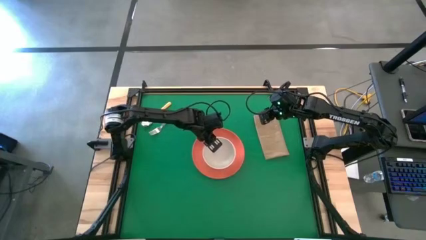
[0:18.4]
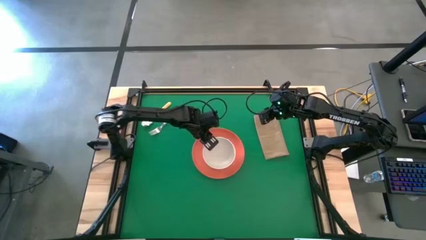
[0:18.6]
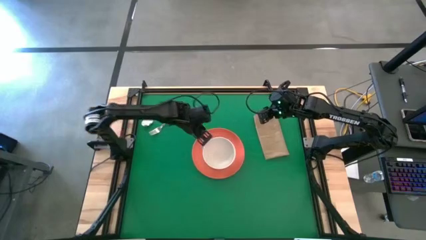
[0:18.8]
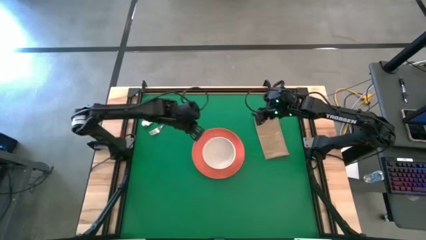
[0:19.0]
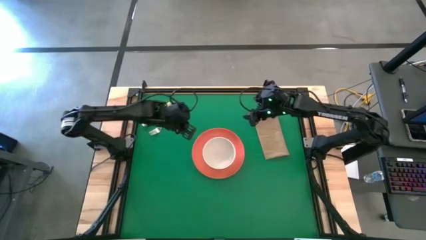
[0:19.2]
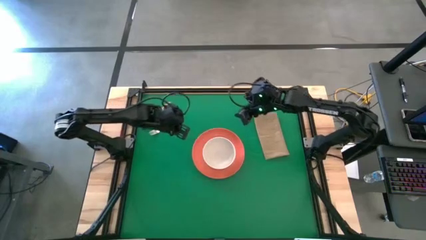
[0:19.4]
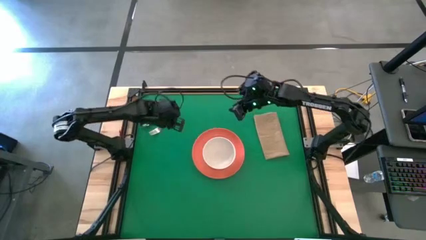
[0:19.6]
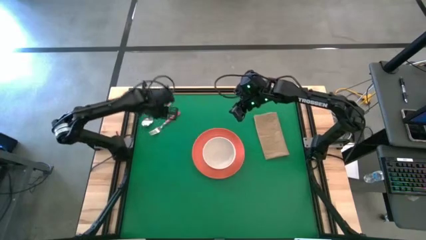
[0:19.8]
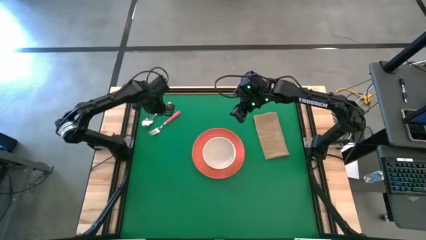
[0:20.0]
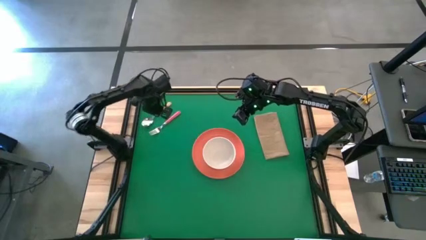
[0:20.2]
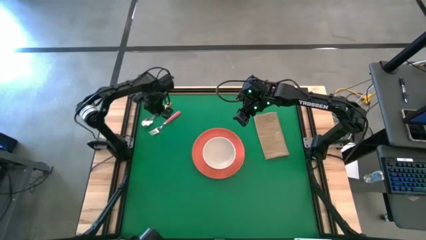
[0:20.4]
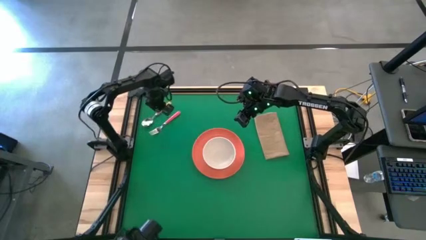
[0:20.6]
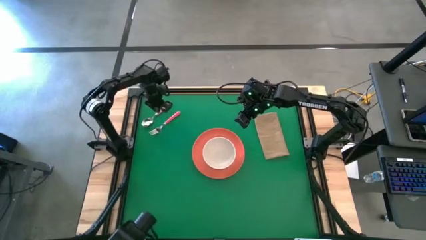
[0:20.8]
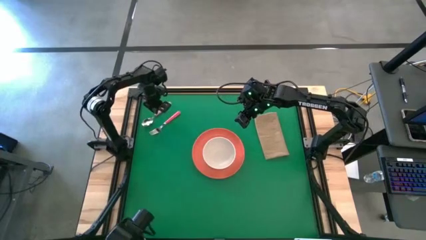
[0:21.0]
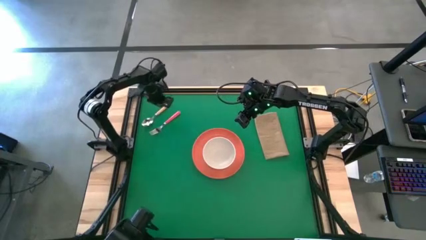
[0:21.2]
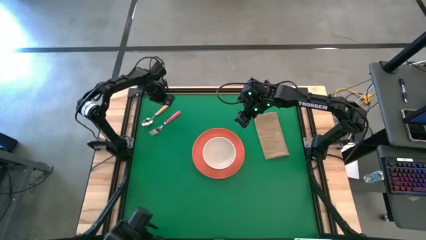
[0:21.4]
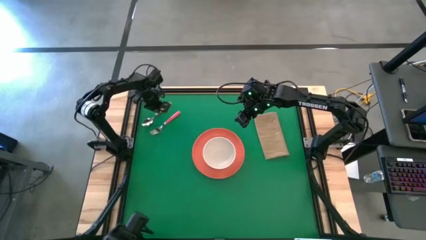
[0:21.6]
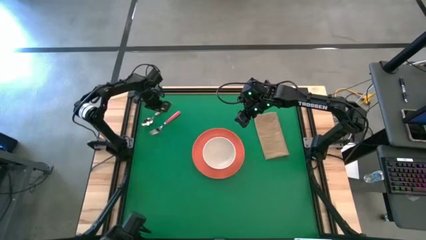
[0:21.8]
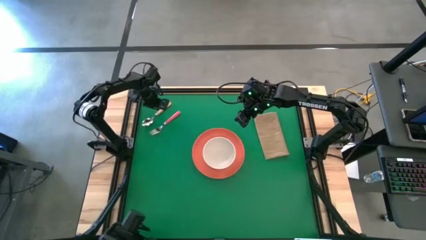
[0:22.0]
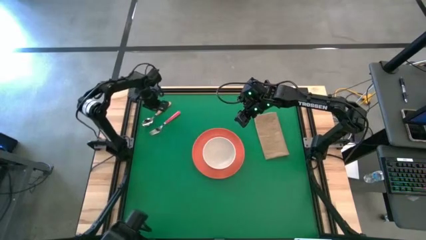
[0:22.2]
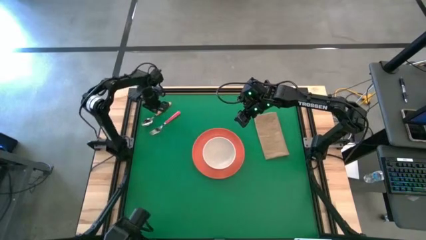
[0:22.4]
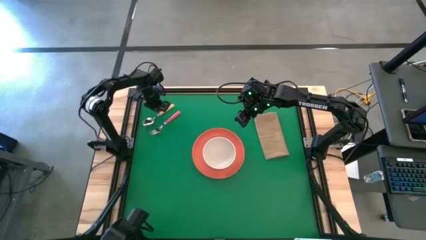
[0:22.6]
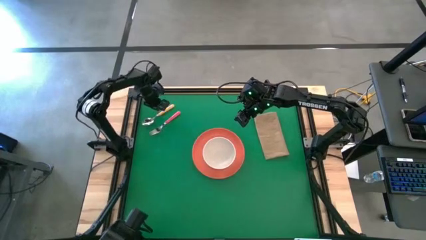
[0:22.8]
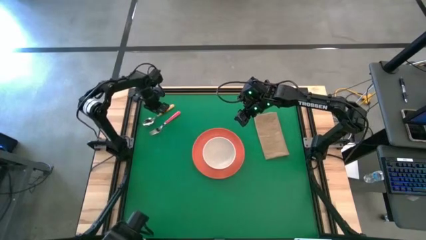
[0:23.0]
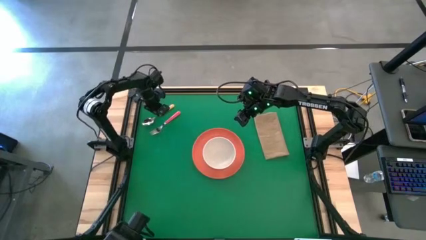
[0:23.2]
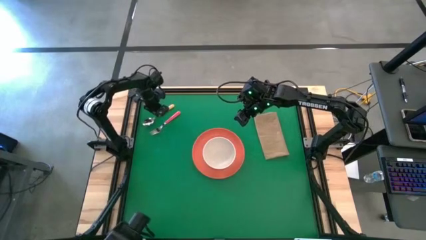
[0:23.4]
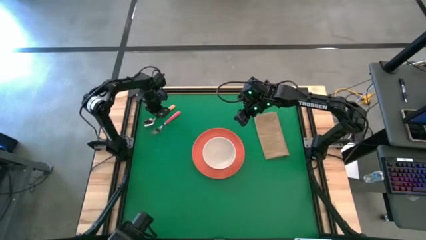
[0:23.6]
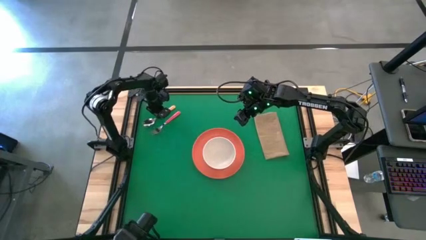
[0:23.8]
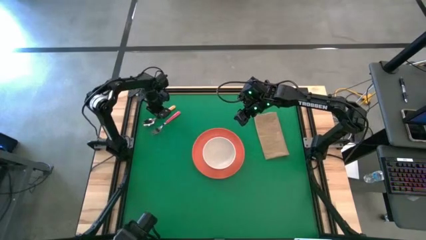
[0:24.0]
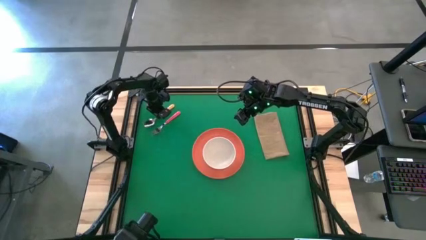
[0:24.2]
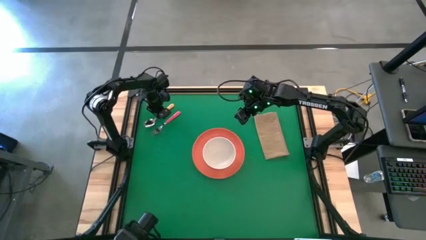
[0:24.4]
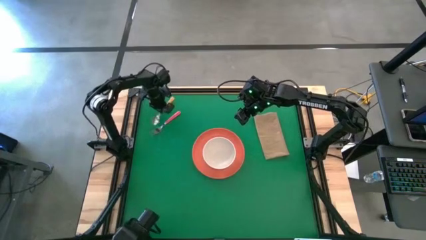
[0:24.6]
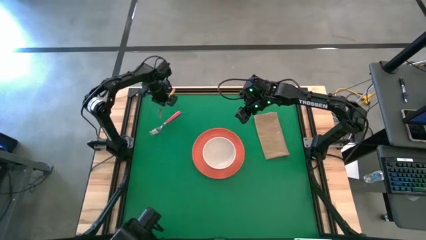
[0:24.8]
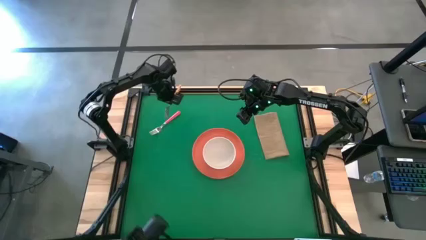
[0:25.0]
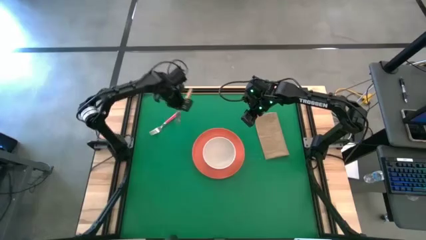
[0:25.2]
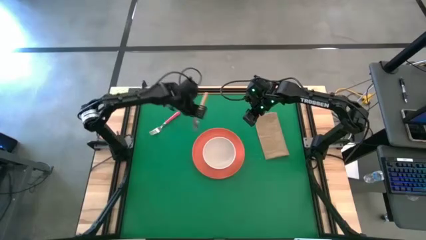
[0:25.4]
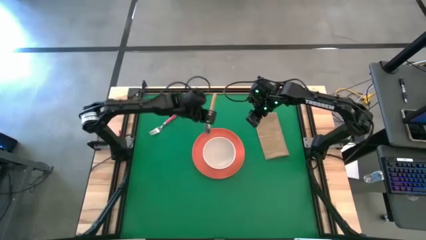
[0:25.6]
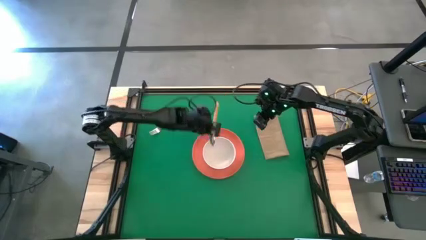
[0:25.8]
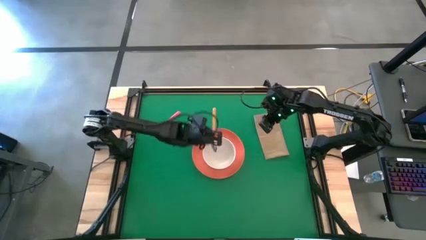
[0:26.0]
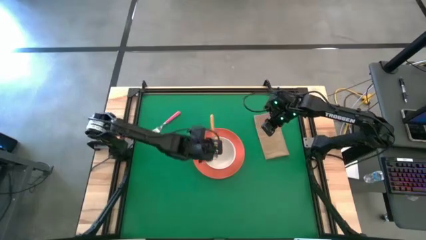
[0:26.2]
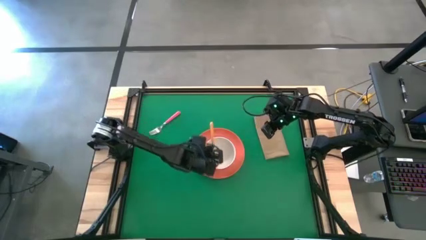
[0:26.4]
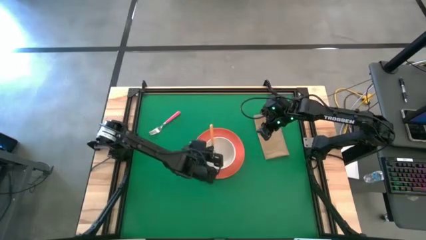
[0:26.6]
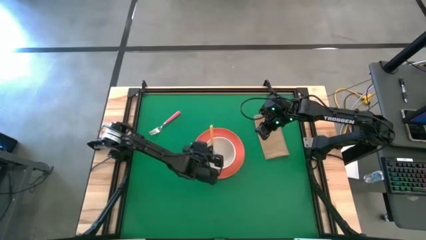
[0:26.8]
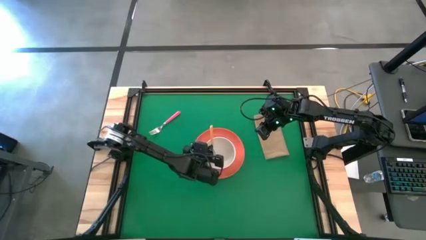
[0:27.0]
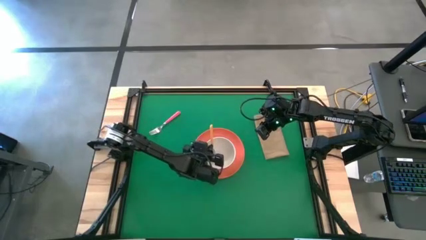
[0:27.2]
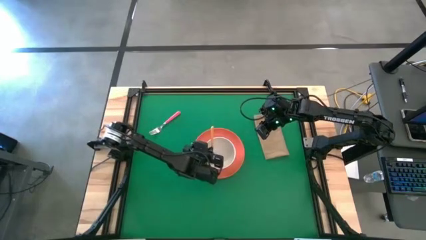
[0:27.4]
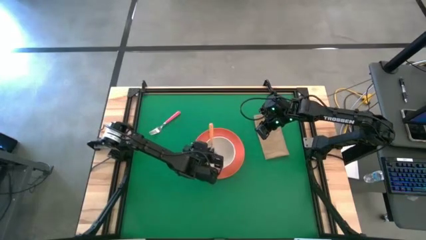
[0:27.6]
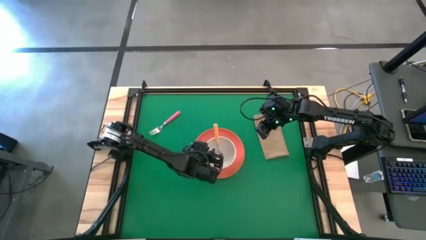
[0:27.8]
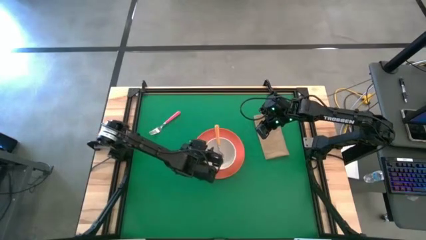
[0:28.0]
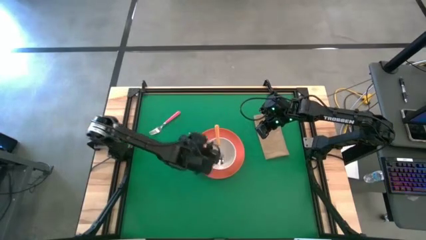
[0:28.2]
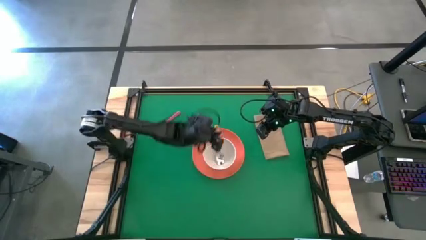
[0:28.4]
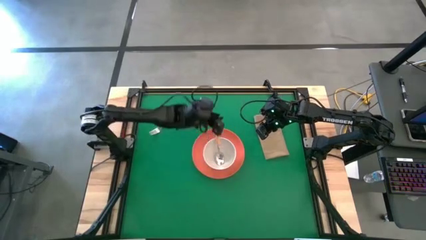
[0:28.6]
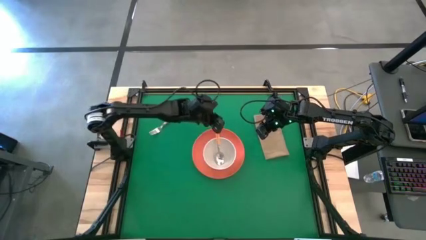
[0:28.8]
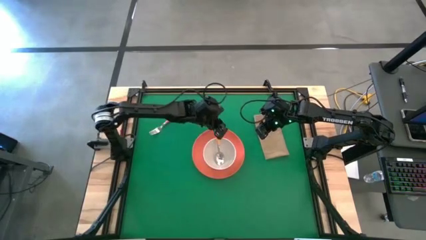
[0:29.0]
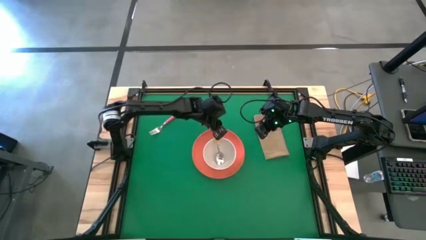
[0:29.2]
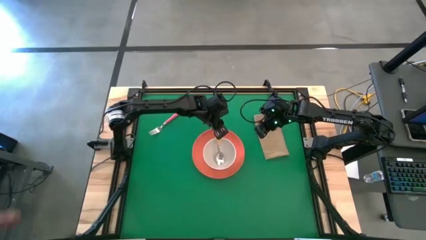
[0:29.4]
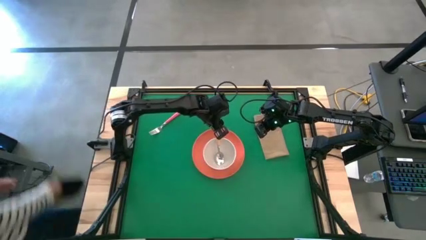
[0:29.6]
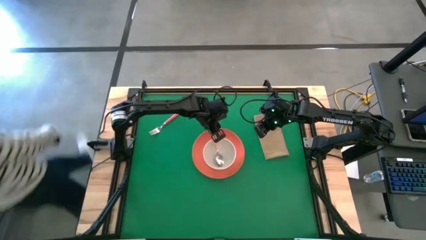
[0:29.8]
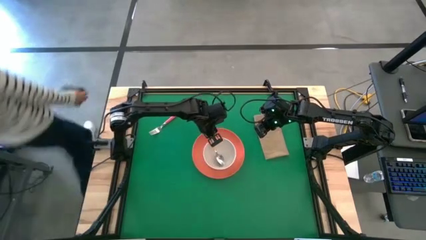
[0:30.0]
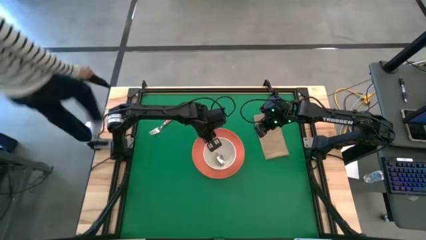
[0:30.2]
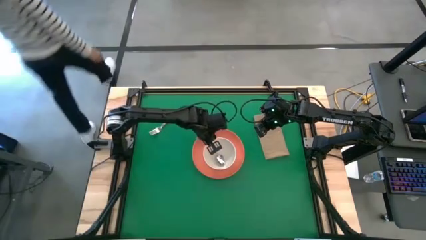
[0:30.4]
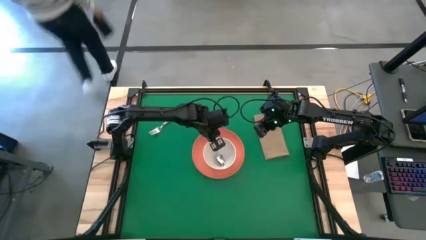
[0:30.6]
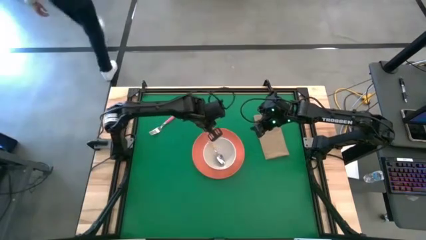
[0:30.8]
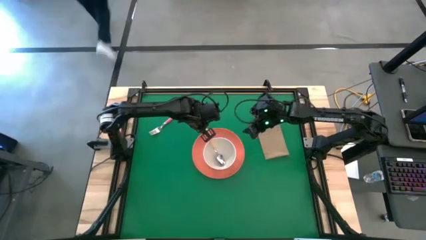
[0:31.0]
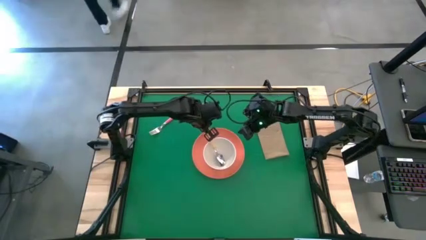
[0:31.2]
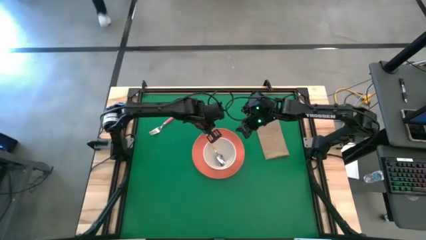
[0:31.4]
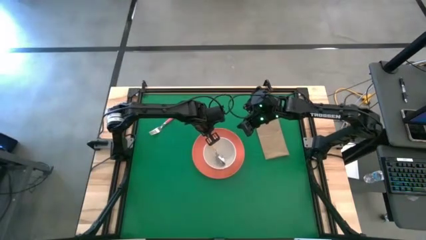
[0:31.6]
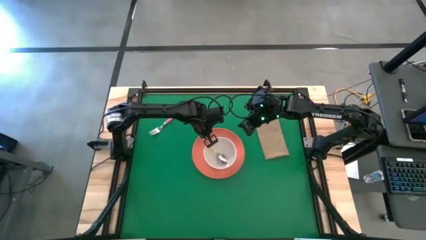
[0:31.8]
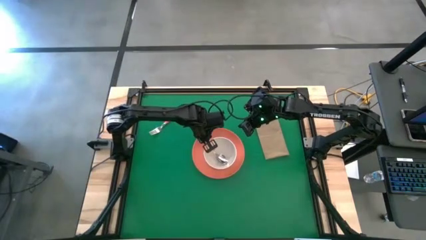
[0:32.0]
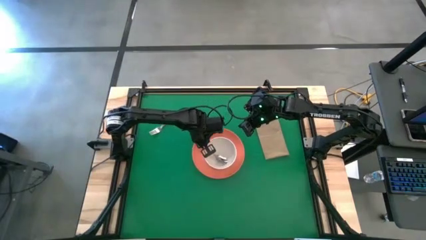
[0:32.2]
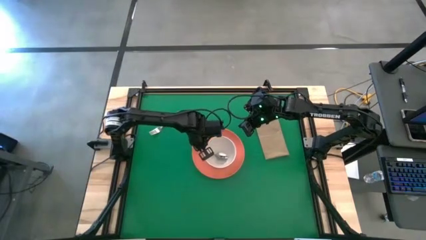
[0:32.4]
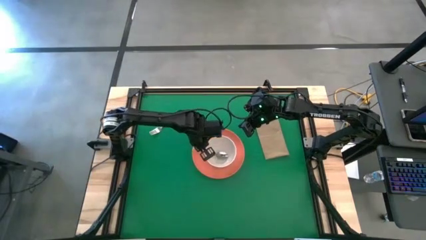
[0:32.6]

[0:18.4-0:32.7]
Task: Set table place
Put the yellow spoon into the white bowl

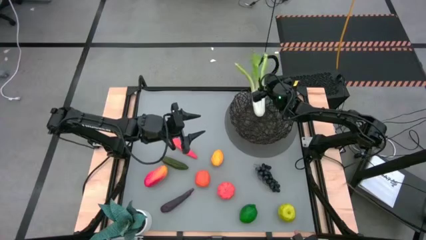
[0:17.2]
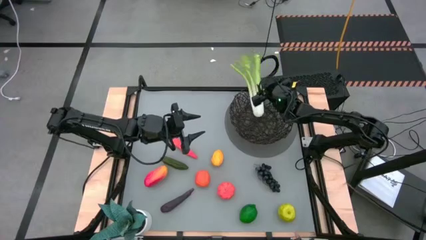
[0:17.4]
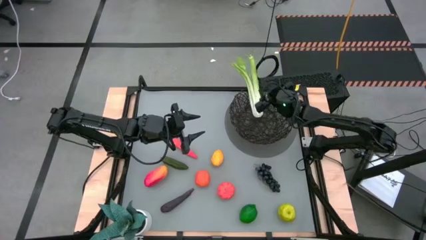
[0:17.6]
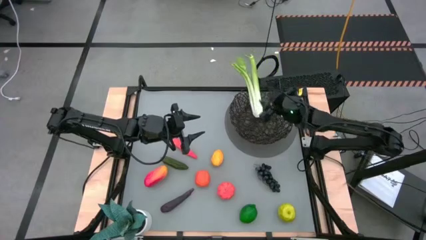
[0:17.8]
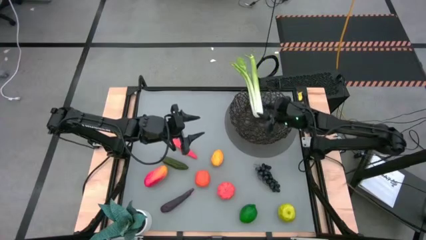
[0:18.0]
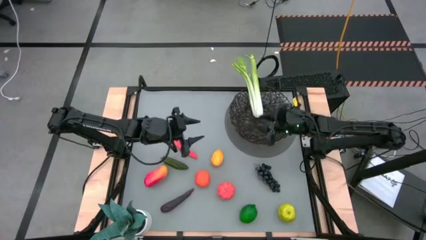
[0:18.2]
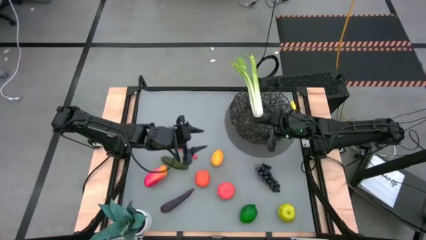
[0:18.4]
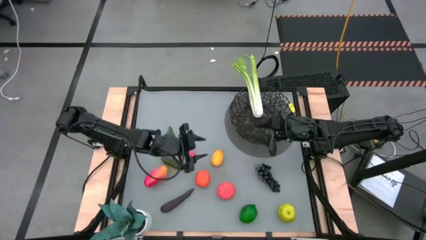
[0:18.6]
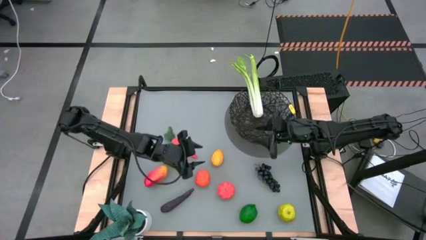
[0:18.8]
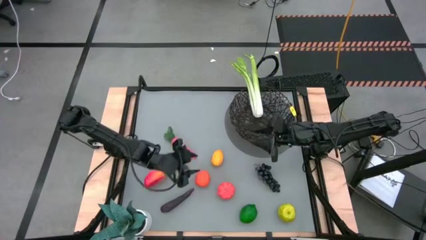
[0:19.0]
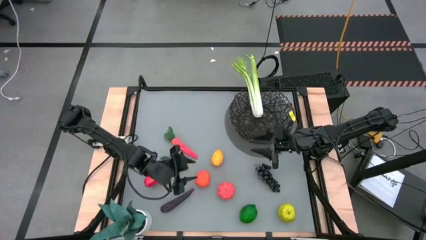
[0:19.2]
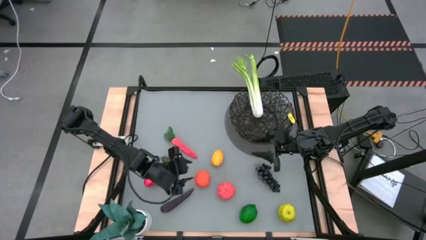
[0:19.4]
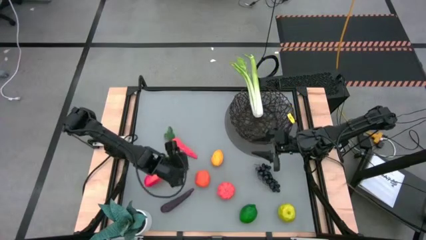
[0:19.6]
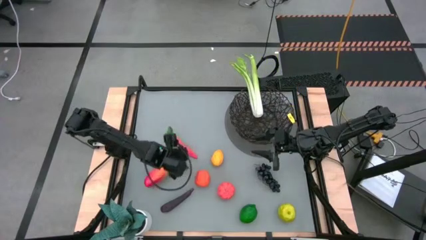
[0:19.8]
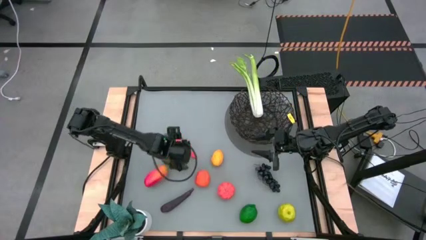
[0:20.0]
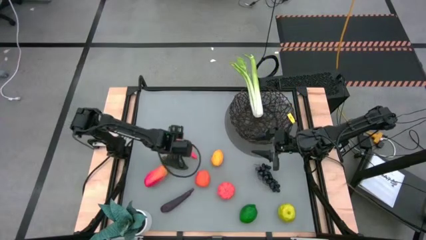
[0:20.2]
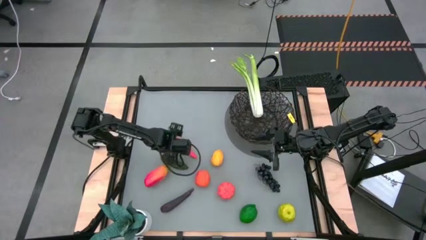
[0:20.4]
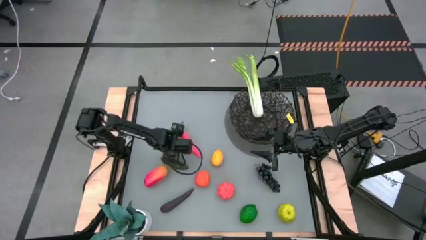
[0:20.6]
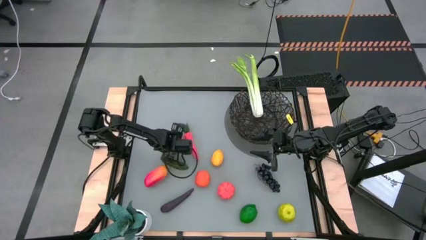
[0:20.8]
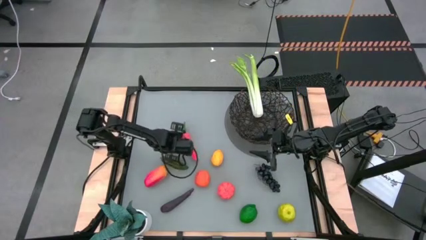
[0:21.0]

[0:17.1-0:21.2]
Task: Build produce basket
Put the carrot into the black wire basket
